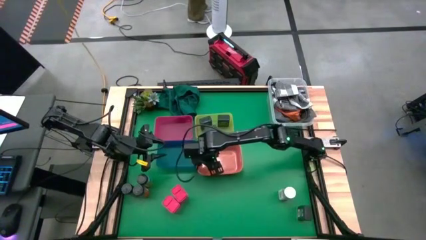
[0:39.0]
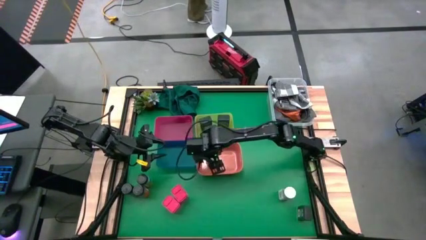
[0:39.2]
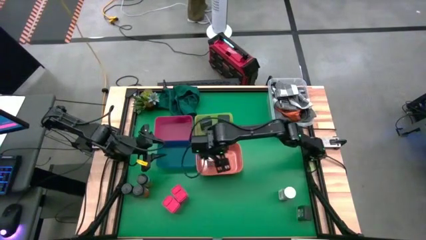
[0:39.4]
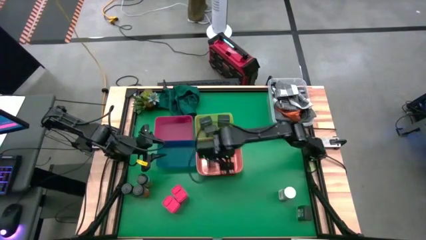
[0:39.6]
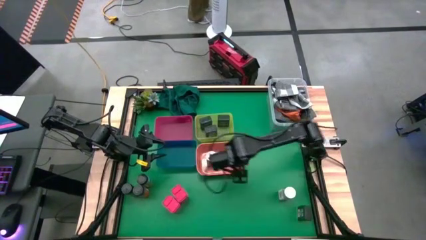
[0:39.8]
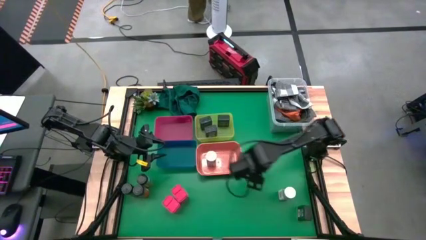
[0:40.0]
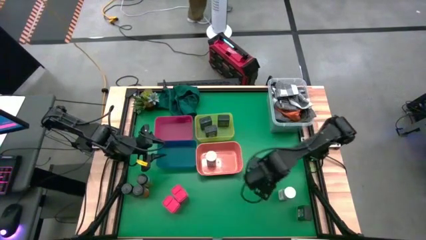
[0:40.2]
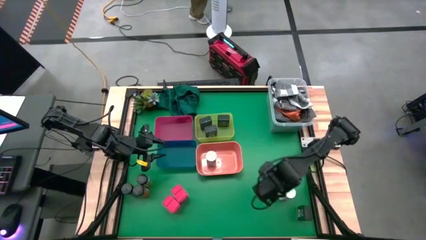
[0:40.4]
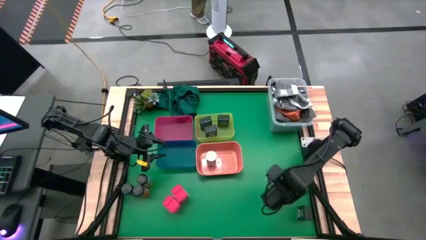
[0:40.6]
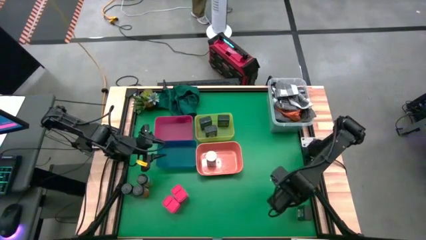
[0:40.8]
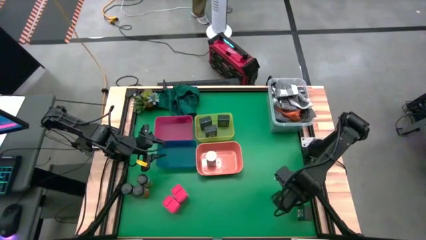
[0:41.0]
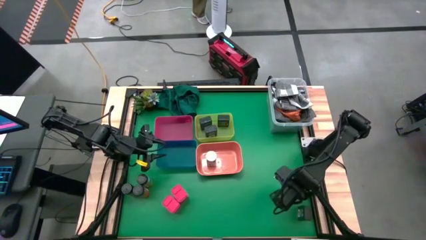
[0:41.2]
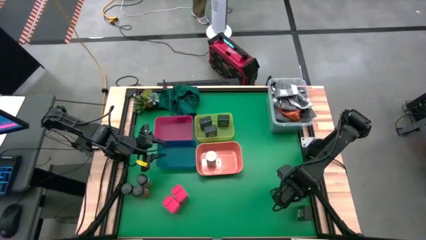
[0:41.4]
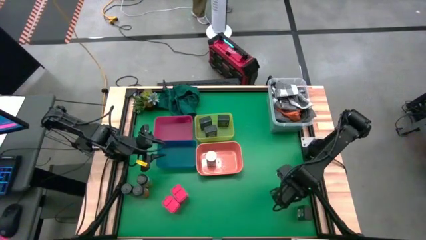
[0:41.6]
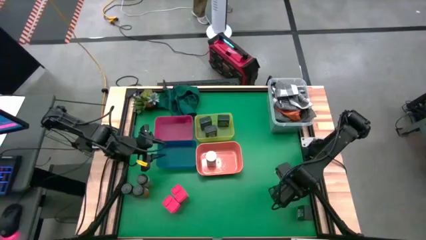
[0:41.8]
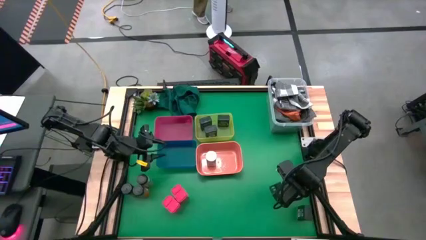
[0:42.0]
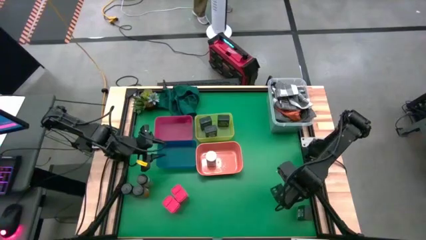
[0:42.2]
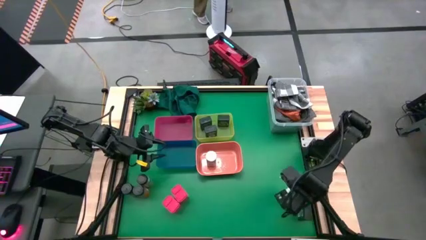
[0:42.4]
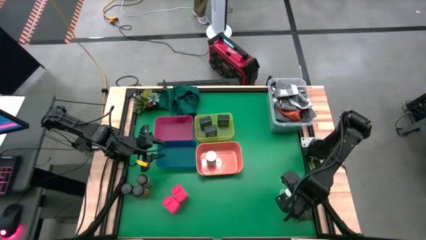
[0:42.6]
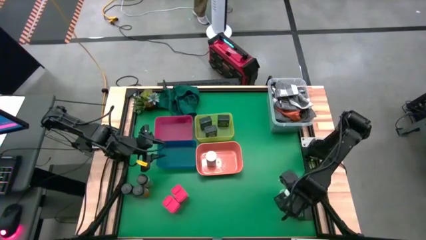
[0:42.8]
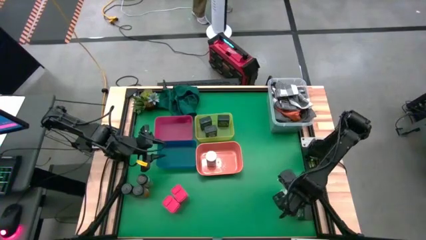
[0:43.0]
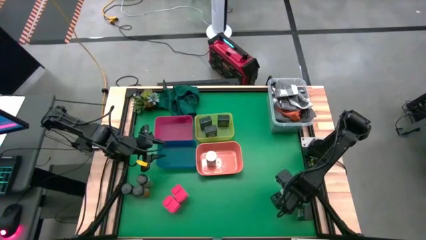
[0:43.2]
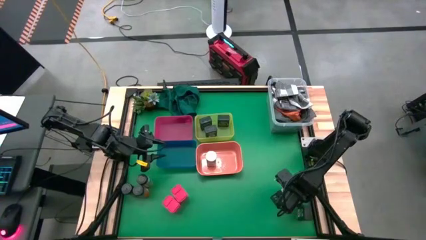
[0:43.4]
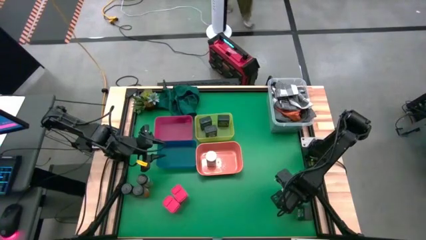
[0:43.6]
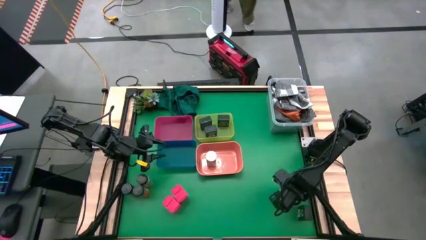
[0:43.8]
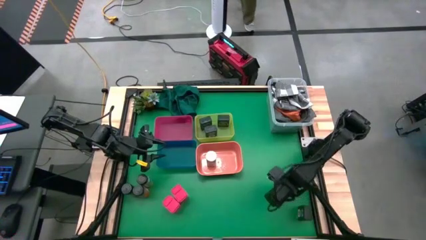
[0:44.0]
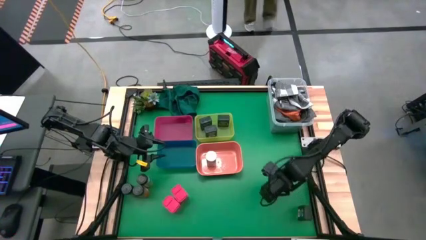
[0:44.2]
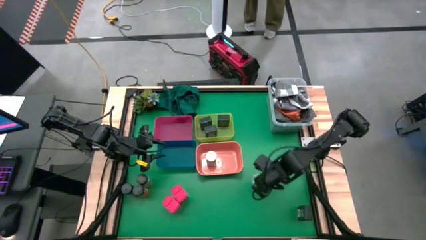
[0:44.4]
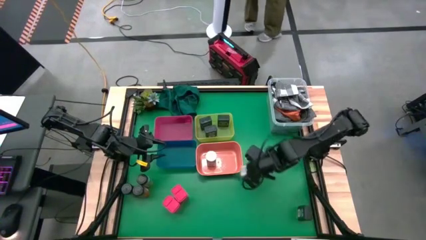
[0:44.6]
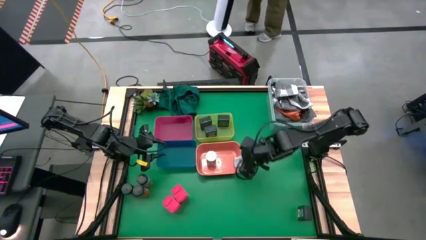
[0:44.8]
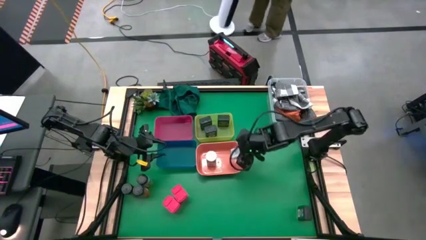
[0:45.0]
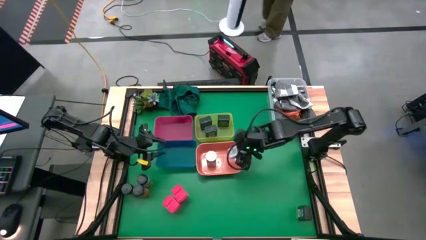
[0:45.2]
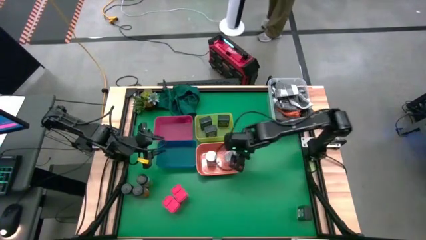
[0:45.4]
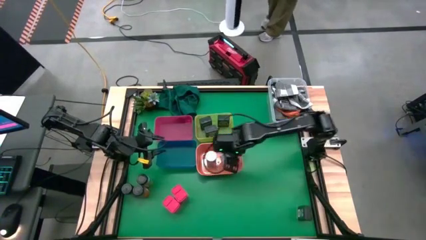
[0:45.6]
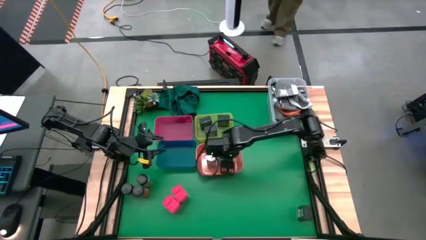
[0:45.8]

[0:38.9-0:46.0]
Task: Sort spices by type
Put the white seasoning bottle into the orange bin

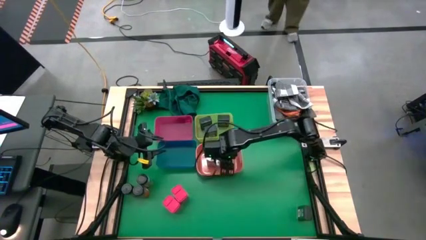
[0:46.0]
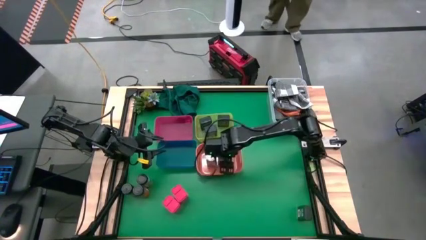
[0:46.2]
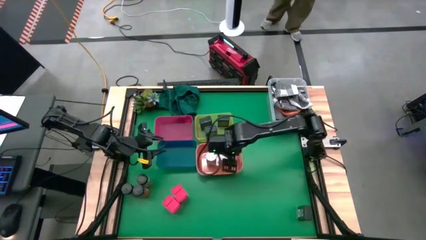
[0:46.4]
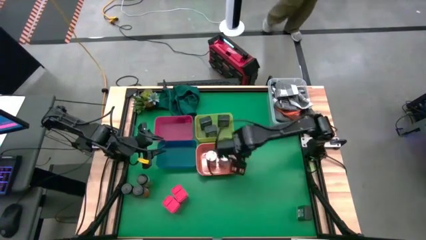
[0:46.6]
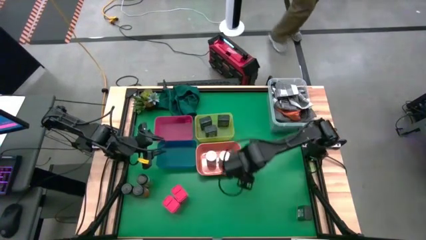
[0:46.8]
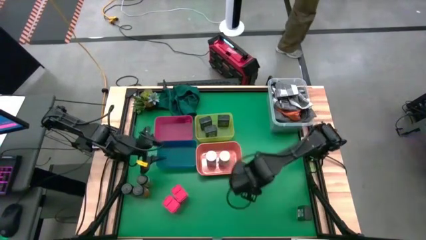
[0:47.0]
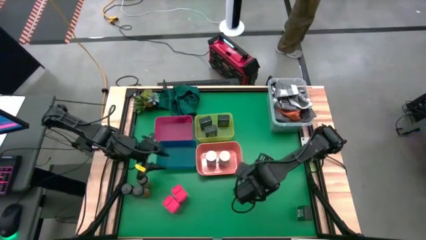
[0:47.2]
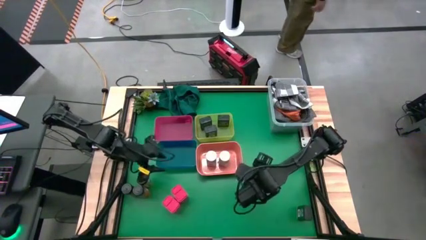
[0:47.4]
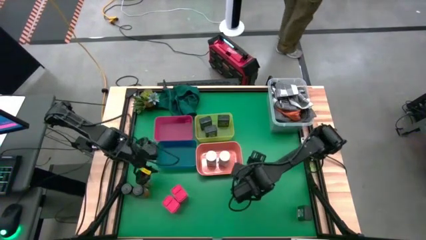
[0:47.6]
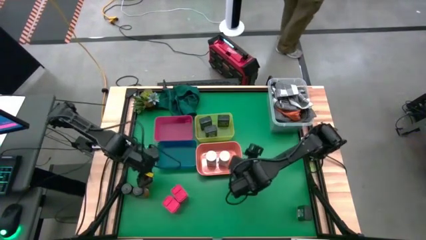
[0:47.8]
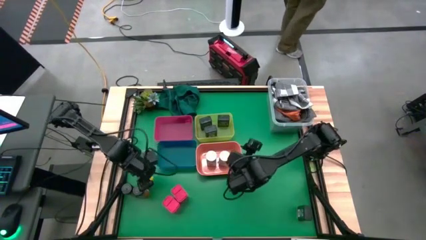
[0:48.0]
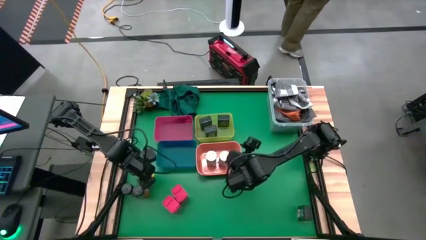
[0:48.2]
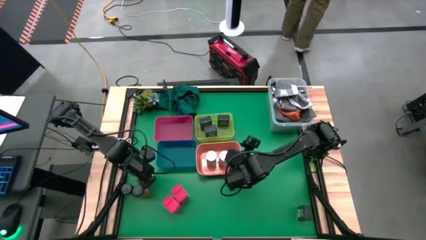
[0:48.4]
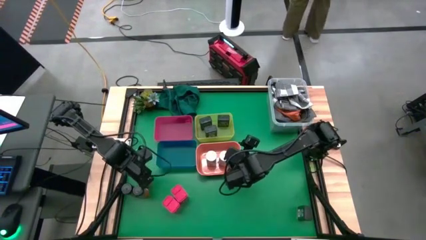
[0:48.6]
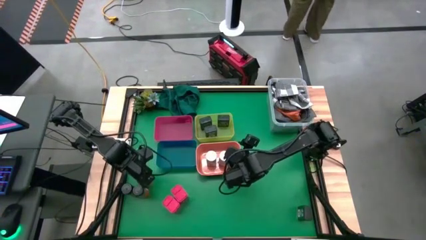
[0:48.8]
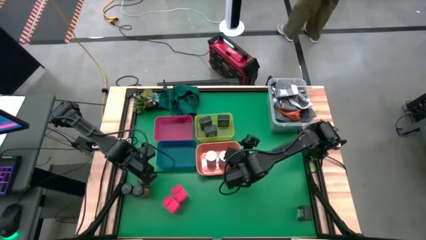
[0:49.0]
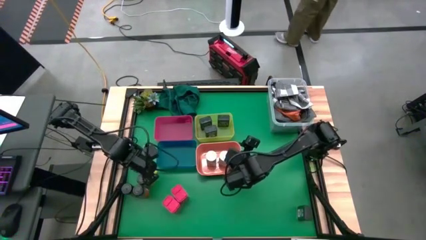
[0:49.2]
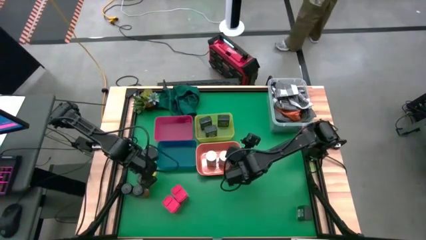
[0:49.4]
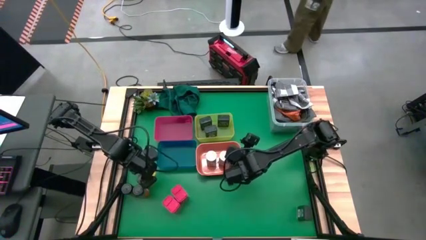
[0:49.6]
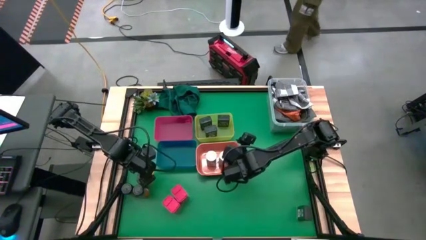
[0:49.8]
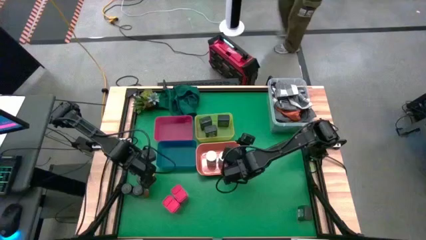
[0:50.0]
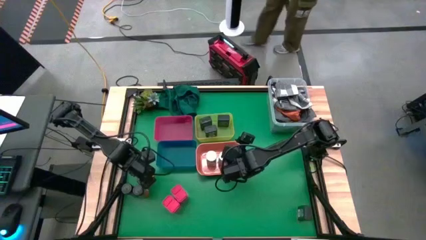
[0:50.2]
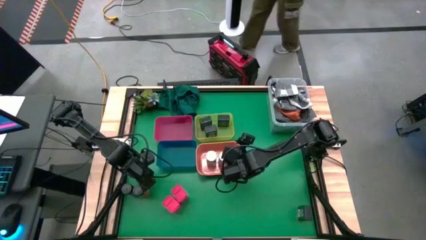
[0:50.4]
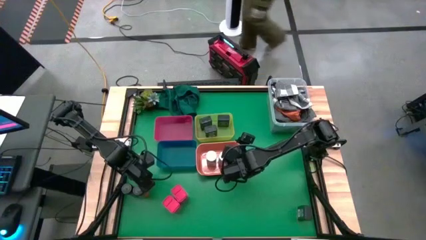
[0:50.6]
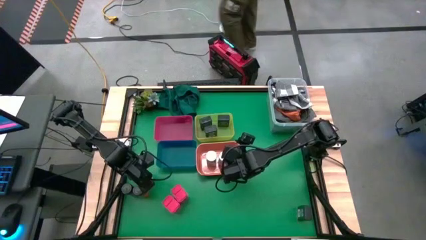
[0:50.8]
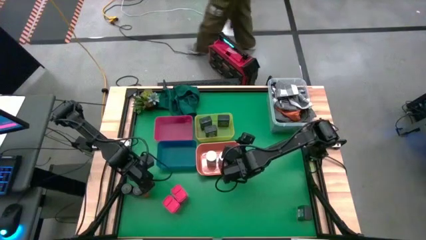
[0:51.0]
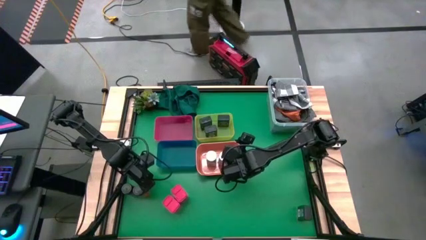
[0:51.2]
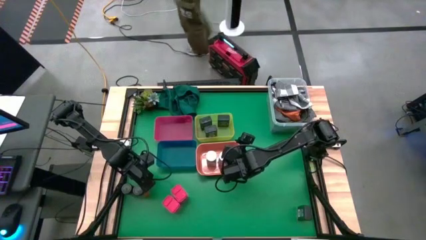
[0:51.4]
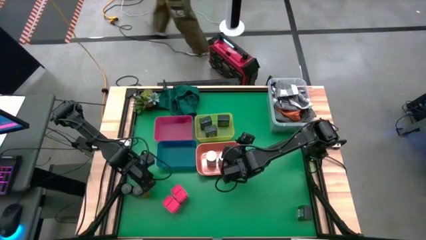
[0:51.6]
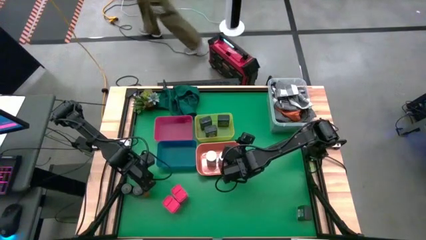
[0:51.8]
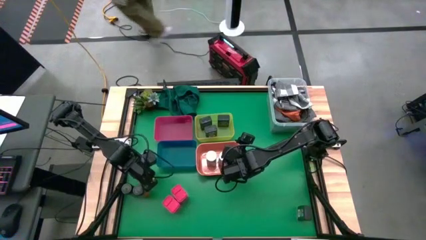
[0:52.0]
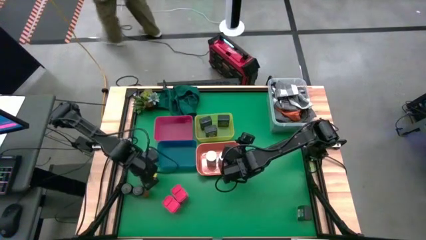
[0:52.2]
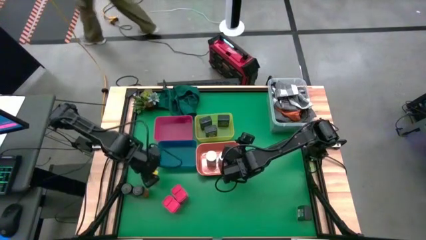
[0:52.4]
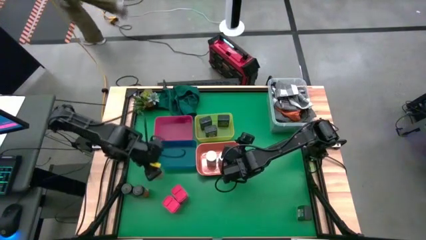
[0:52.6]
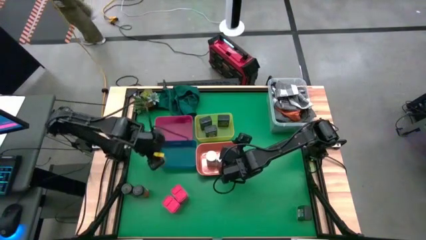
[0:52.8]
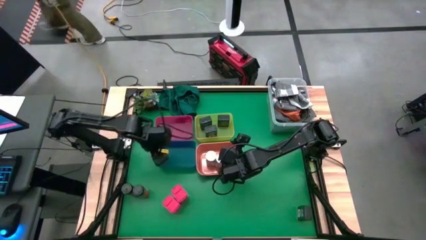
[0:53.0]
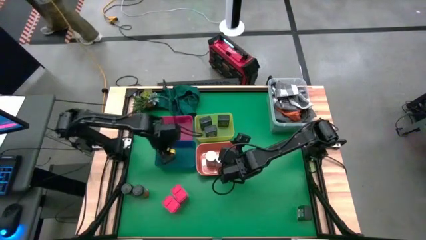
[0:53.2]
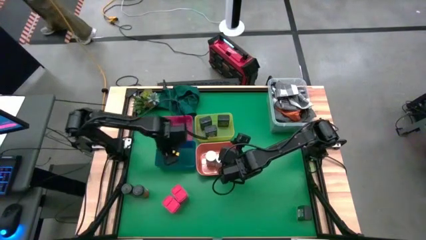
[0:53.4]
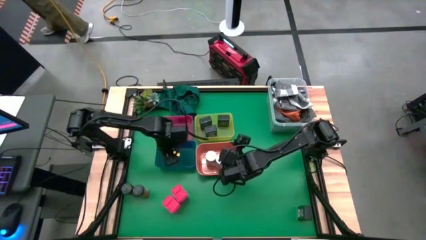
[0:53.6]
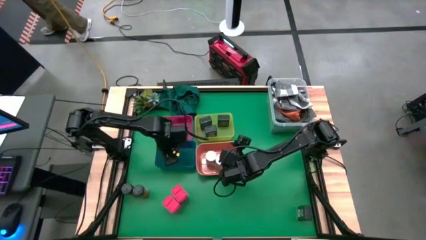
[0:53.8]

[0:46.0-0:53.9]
Put the top right black seasoning bottle into the blue bin
